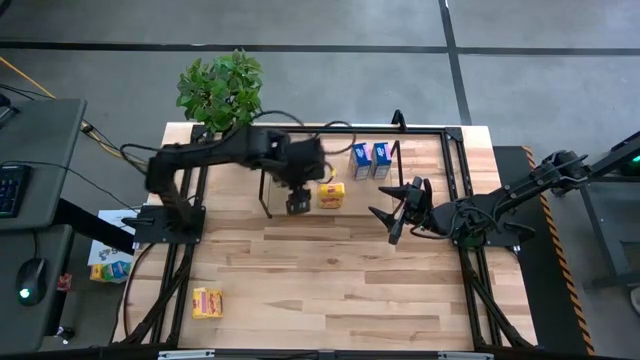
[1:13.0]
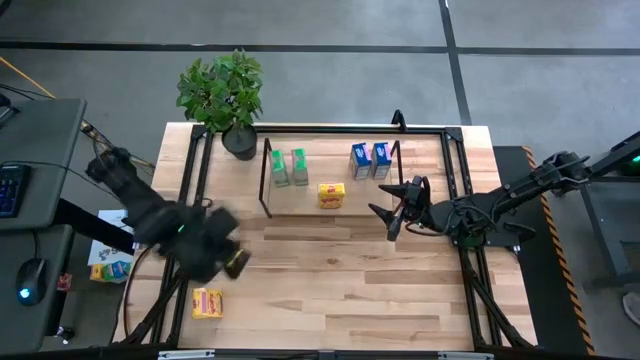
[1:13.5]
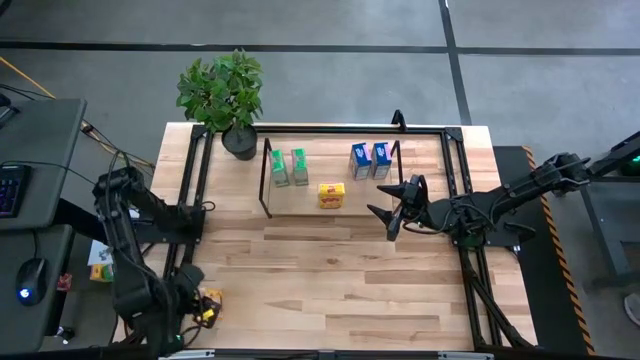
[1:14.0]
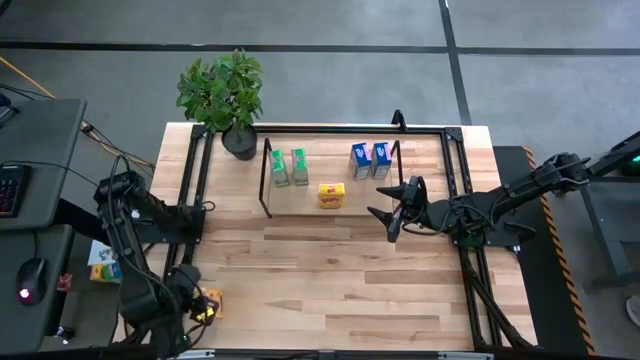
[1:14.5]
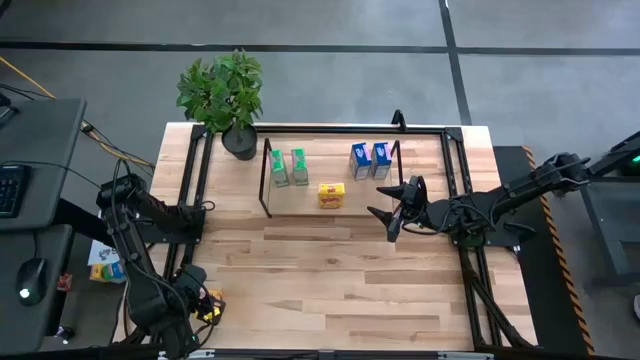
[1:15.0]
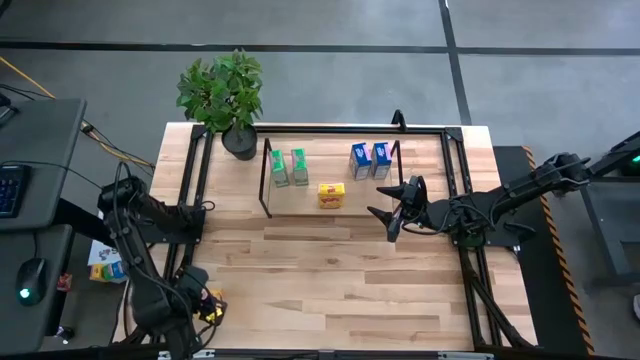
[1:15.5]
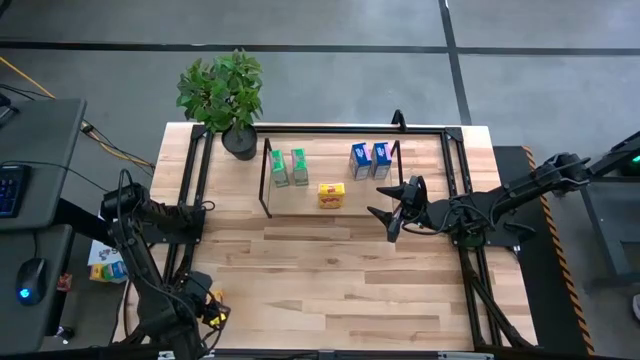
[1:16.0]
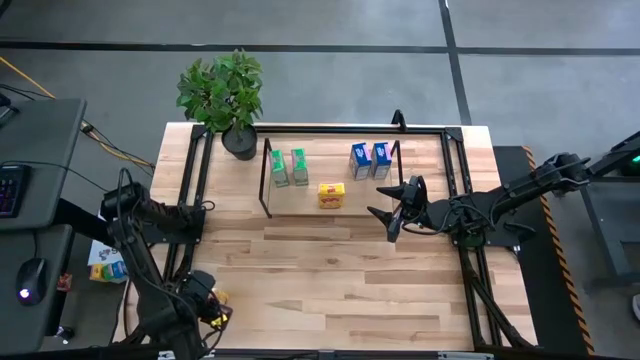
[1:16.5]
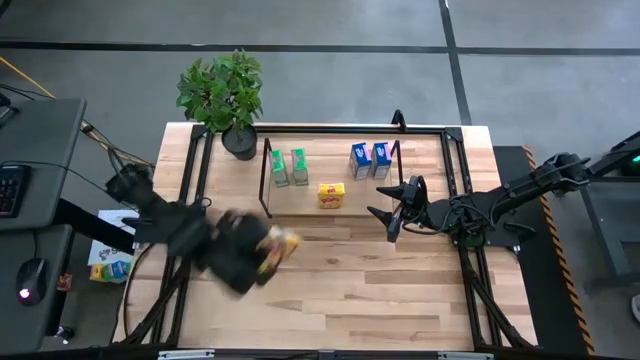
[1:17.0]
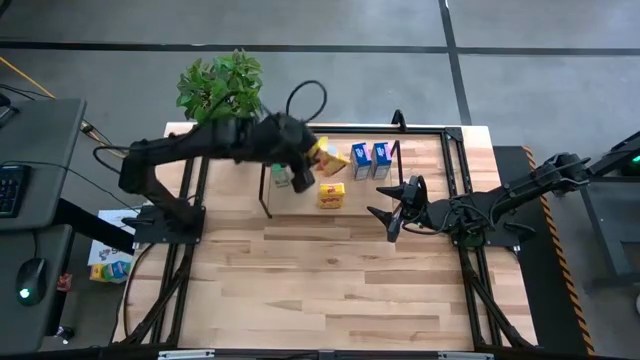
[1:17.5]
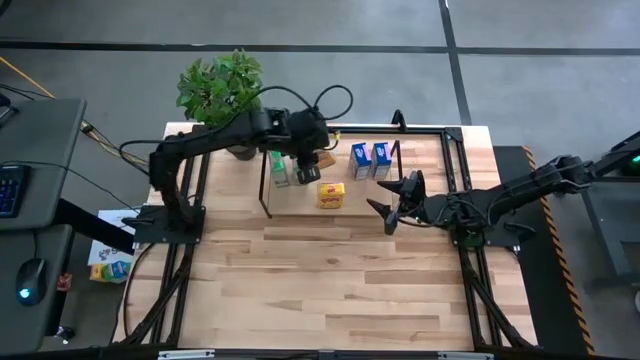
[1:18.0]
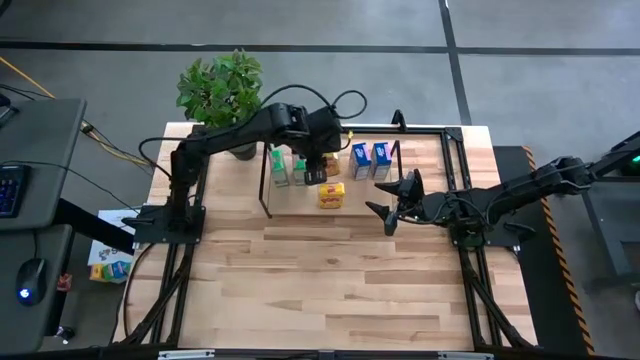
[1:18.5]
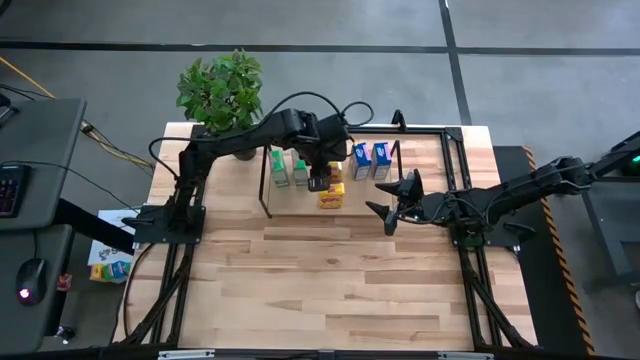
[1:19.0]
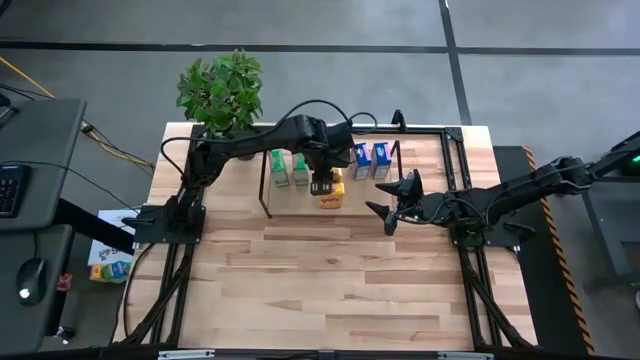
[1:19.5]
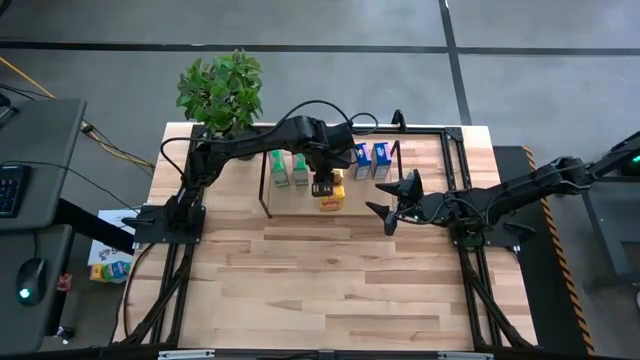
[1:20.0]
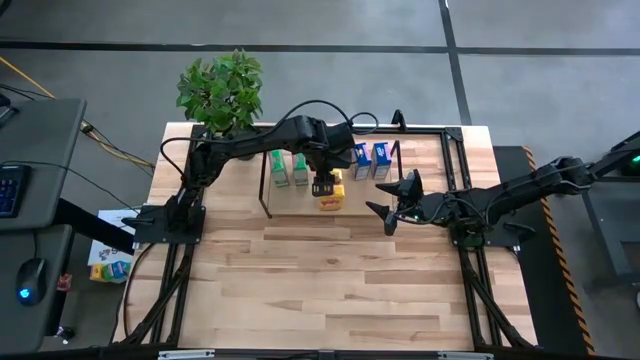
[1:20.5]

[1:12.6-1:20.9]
Task: Stack cereal on shelf
Put the yellow cereal box aligned with the other yellow cereal box on the shelf

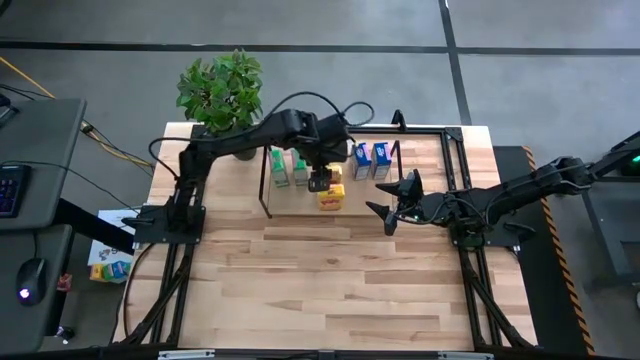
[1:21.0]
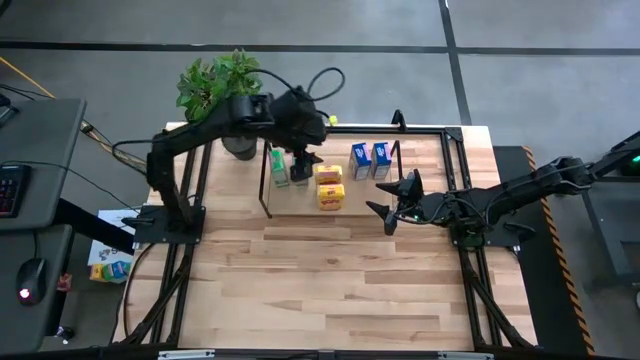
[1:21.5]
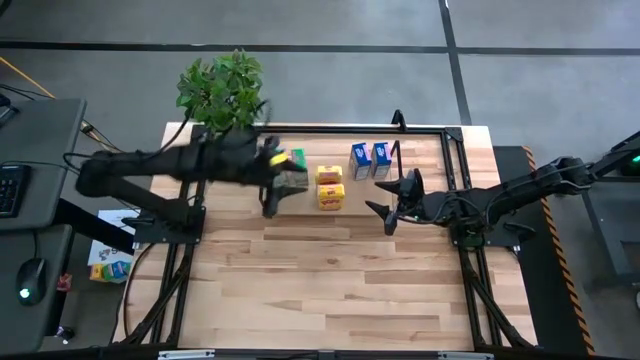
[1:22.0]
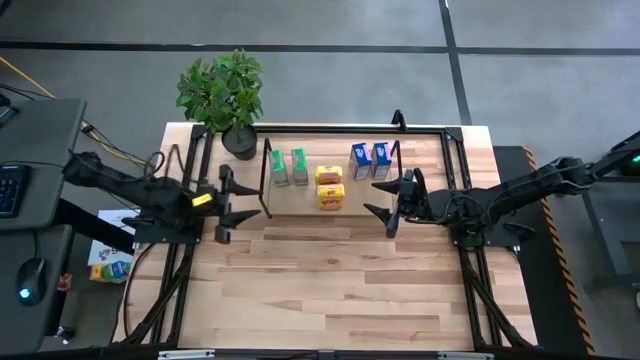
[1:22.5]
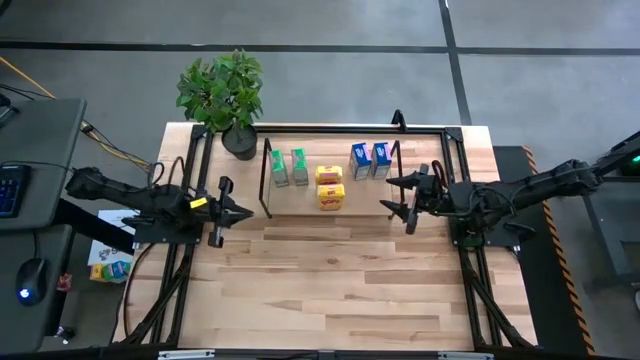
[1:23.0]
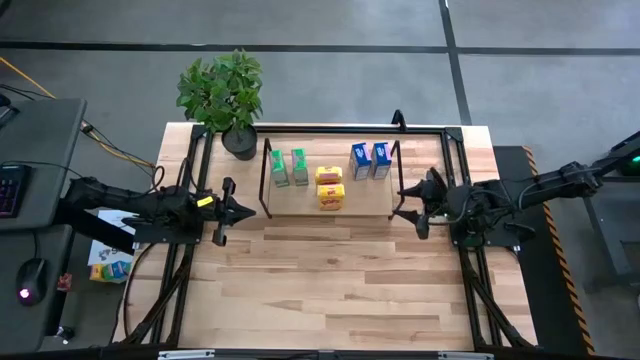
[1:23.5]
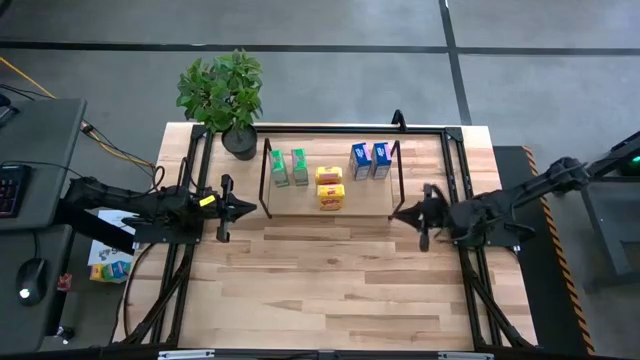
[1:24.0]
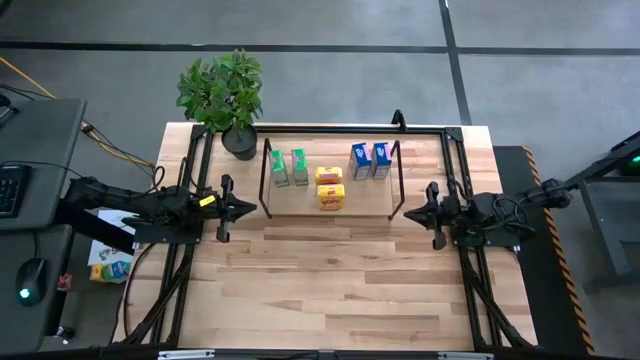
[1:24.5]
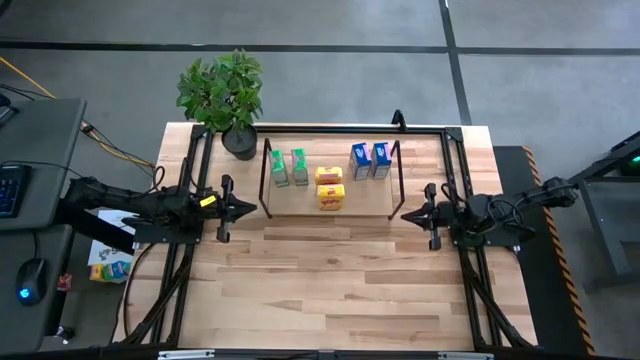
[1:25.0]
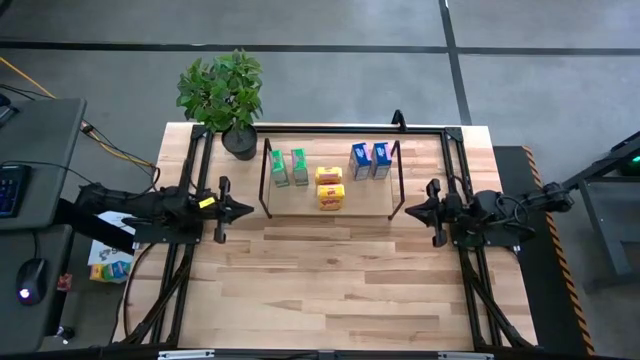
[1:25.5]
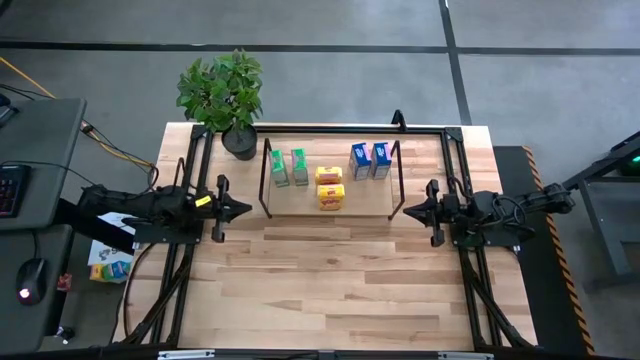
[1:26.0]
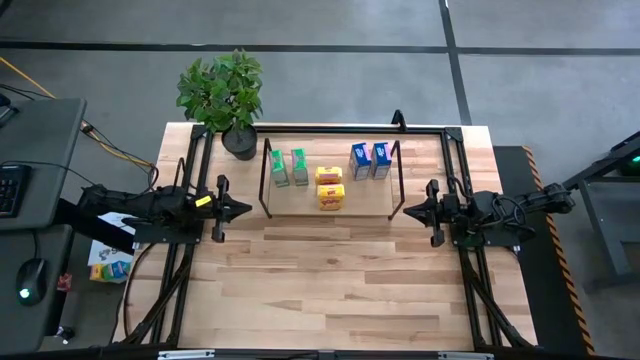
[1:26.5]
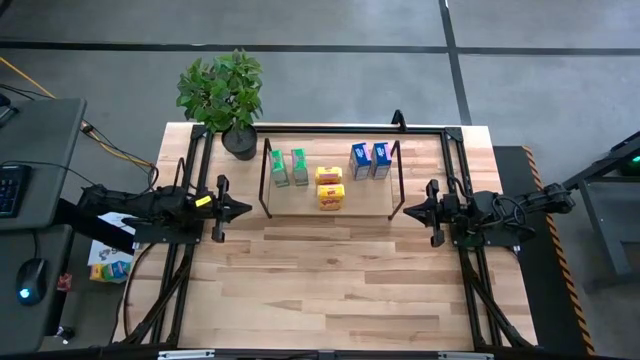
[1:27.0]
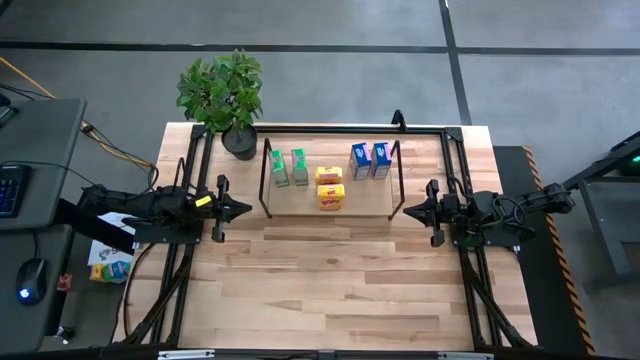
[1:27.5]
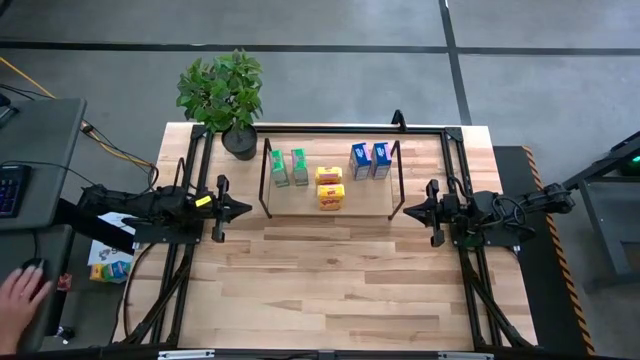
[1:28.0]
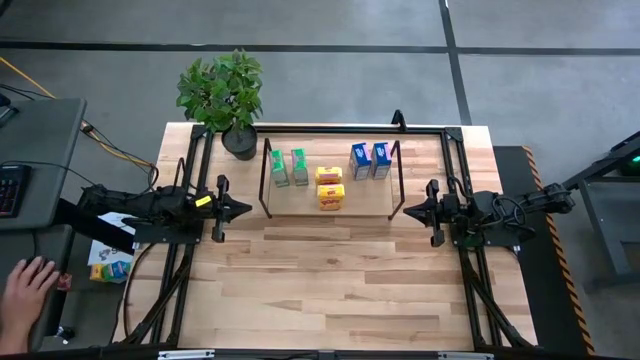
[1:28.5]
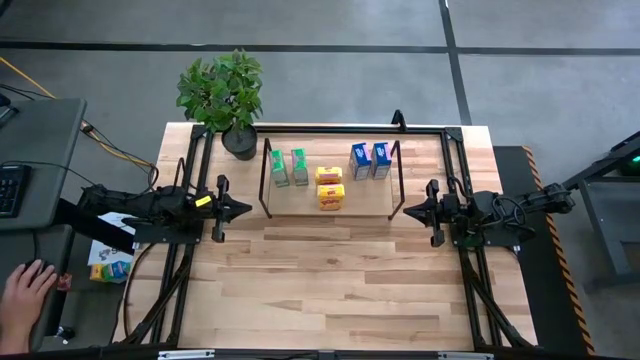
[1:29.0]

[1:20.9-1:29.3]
Return to Home Position

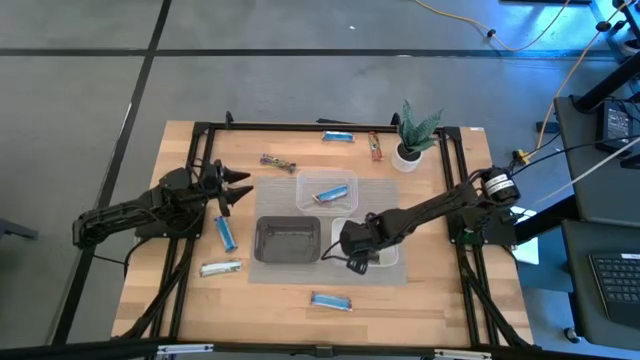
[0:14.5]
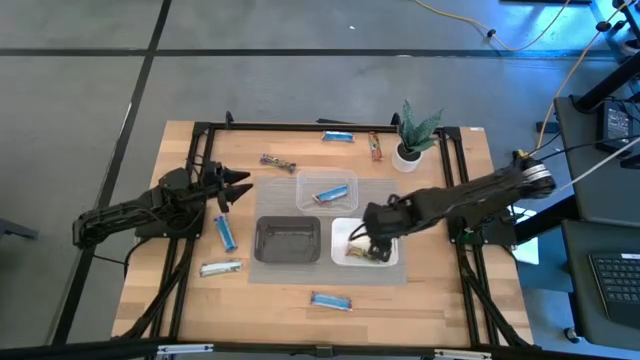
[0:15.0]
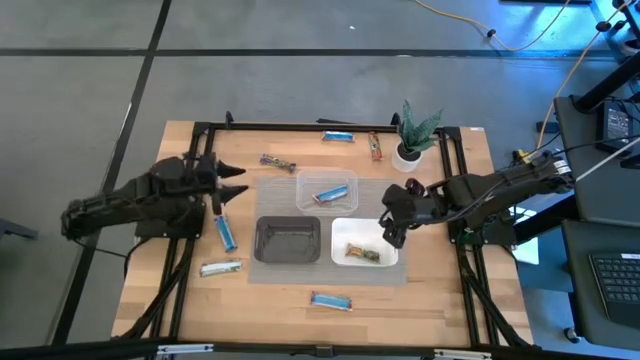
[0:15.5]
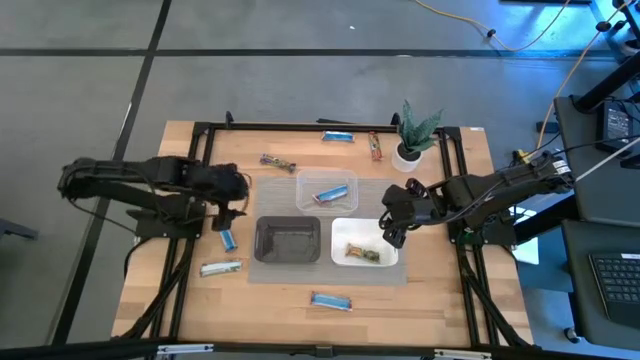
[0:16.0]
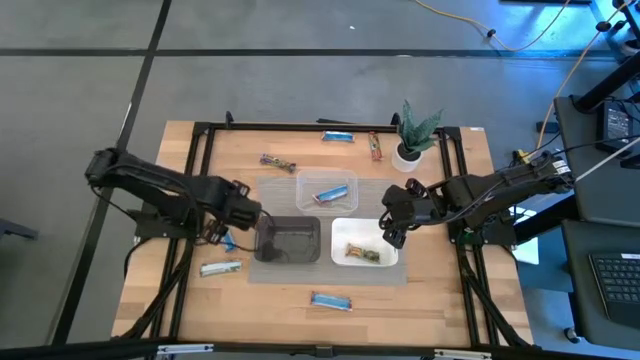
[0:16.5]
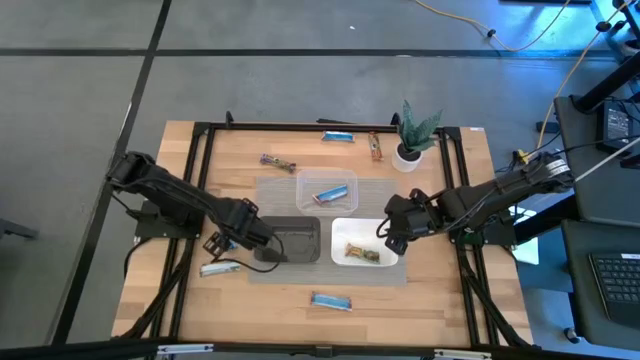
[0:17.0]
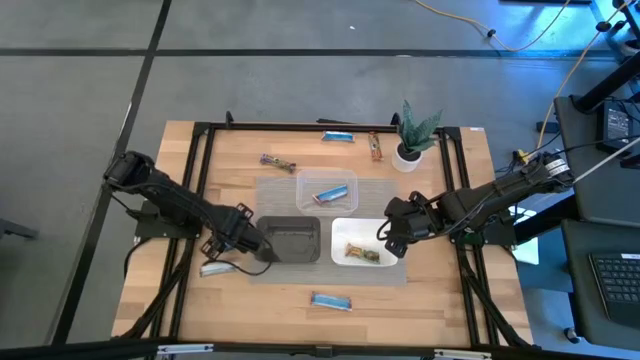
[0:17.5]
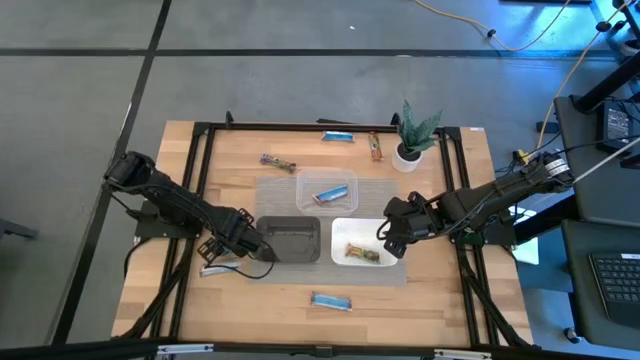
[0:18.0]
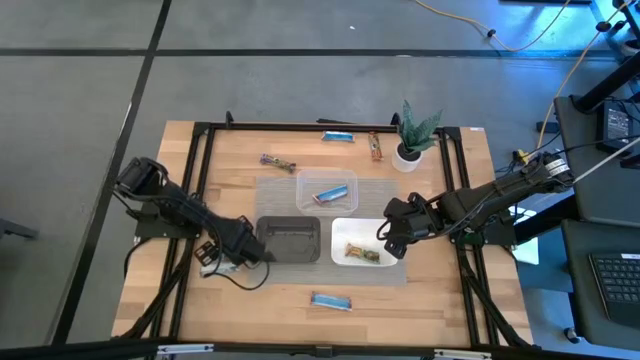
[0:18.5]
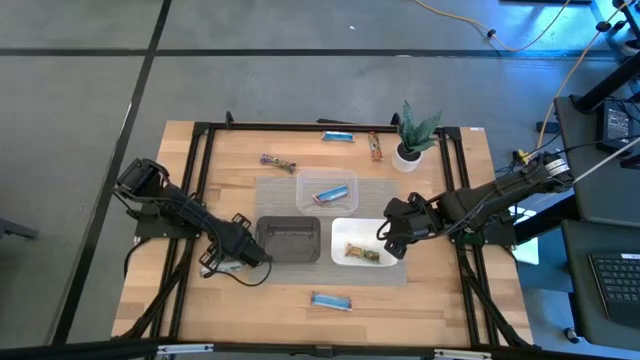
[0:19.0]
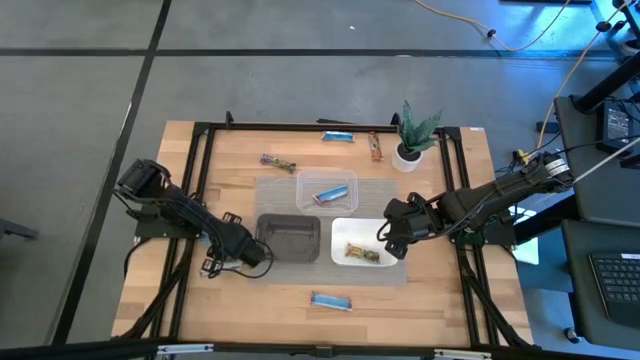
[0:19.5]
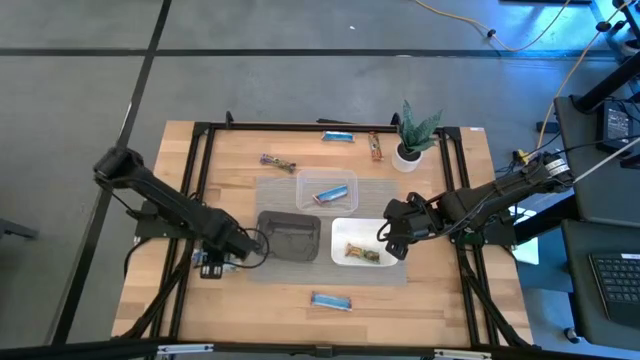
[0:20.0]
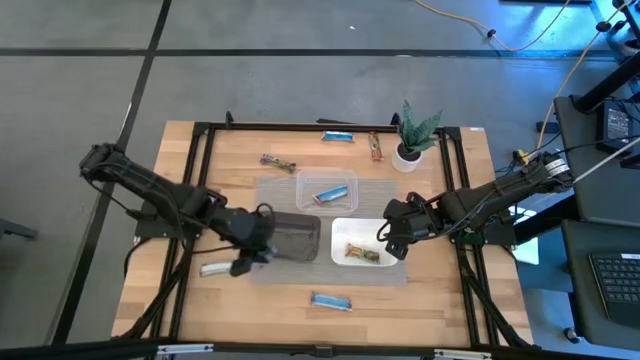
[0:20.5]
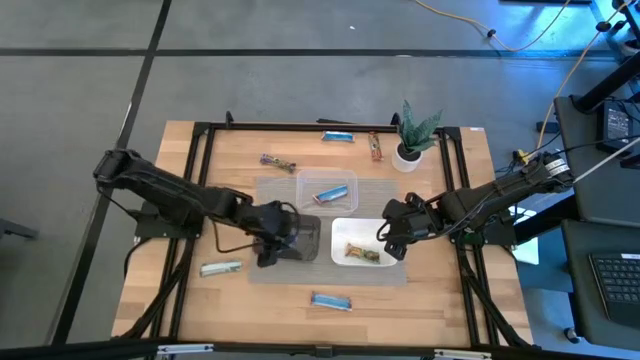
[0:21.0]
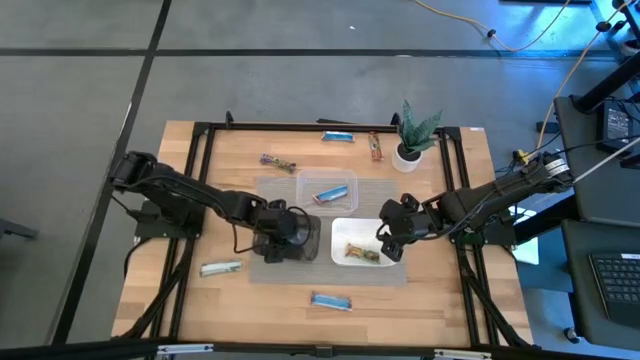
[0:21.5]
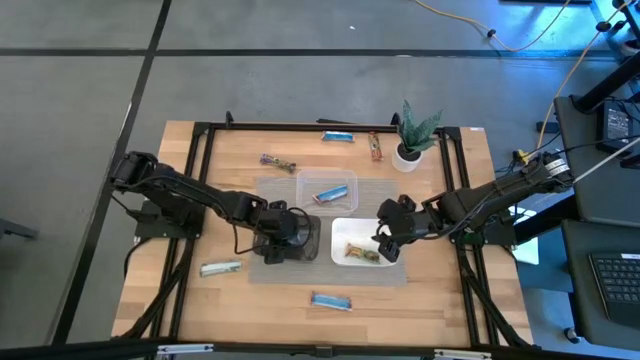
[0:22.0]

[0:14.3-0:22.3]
Task: Pick and place Granola Bars by type
Put the bottom blue granola bar into the black bin
